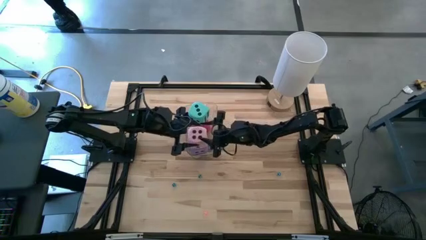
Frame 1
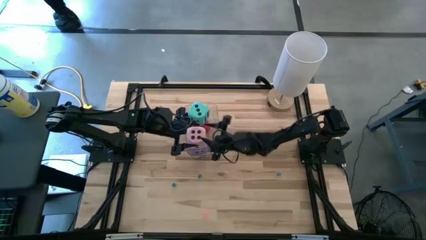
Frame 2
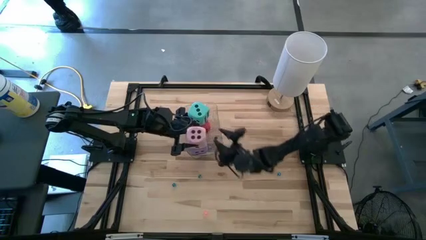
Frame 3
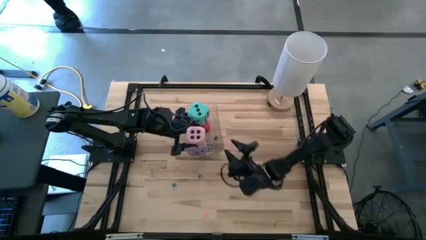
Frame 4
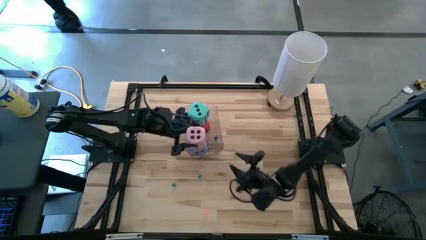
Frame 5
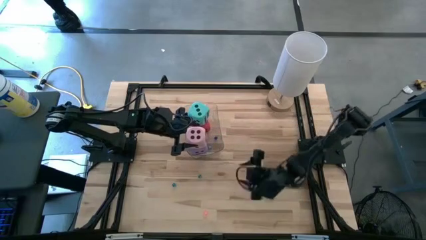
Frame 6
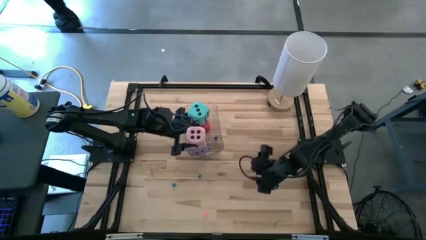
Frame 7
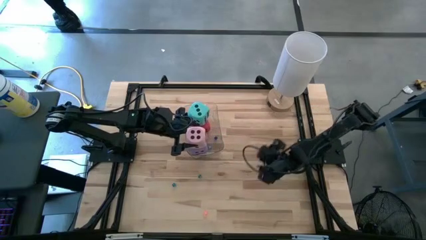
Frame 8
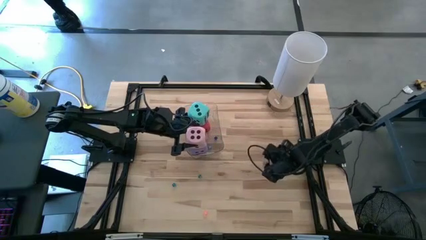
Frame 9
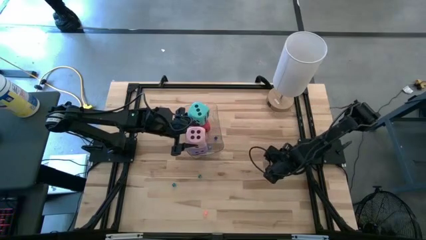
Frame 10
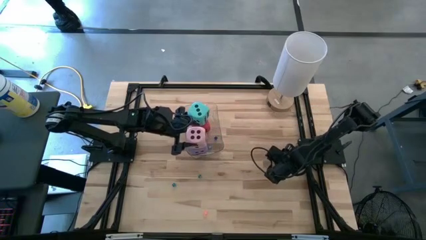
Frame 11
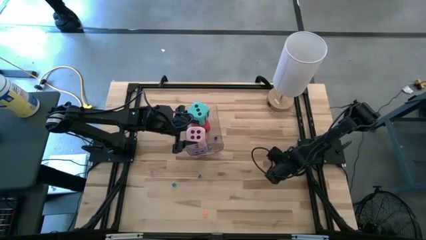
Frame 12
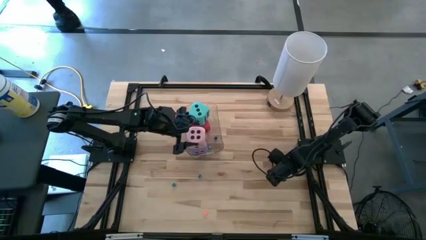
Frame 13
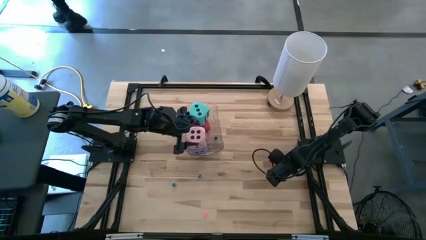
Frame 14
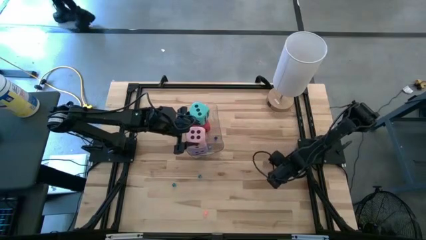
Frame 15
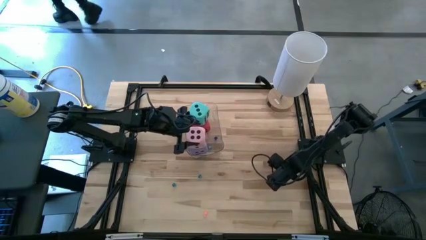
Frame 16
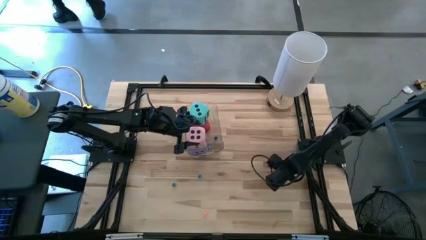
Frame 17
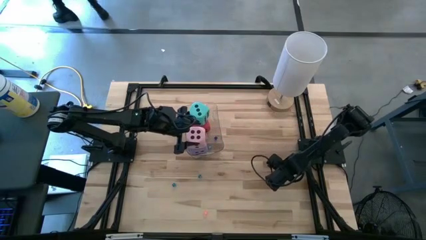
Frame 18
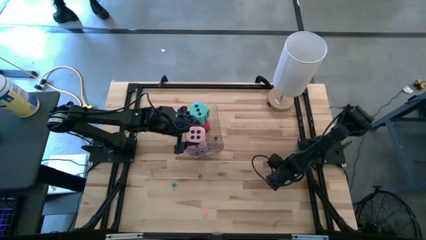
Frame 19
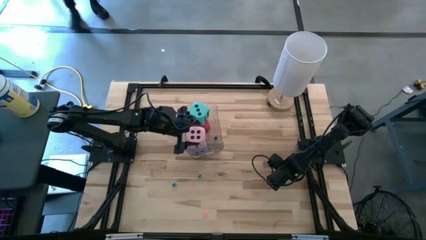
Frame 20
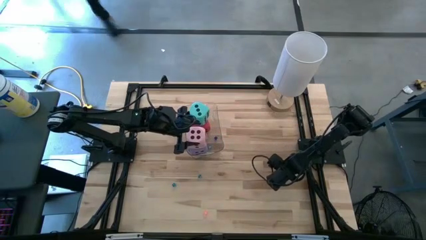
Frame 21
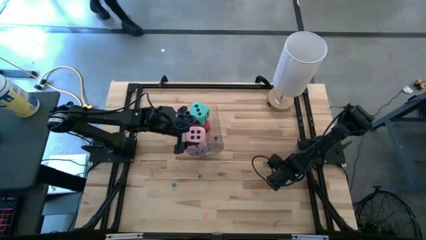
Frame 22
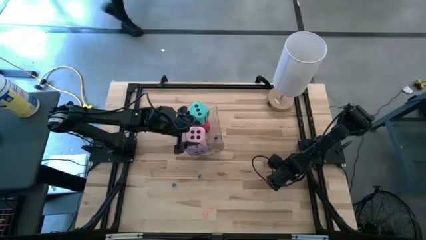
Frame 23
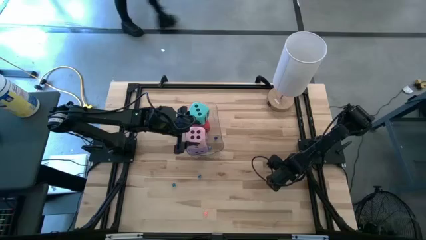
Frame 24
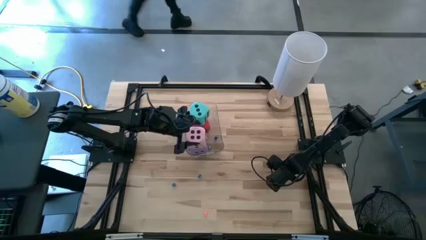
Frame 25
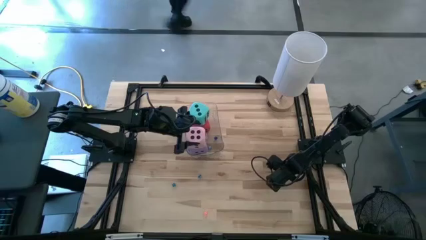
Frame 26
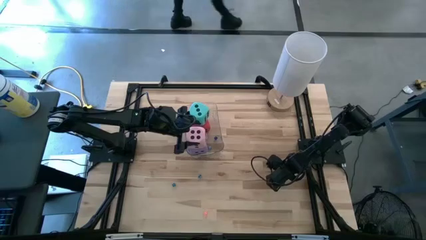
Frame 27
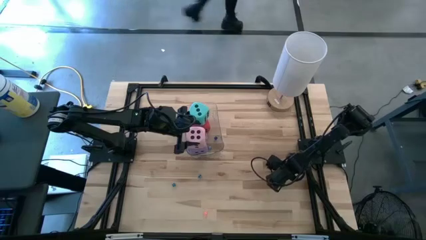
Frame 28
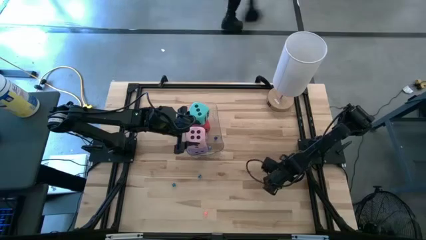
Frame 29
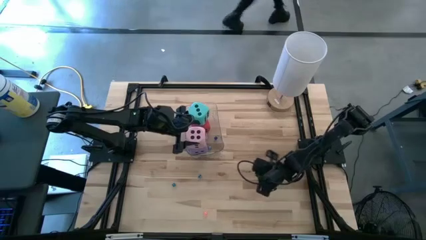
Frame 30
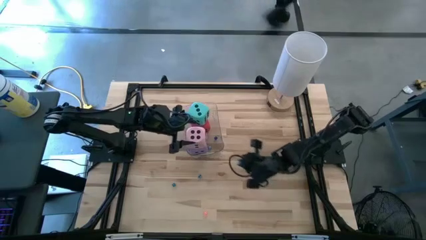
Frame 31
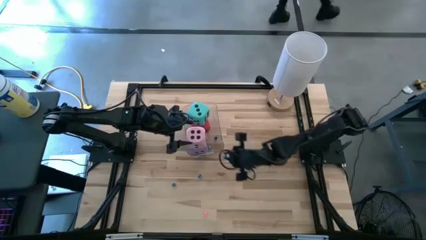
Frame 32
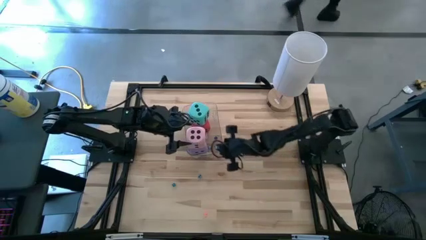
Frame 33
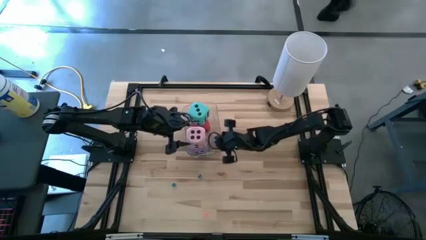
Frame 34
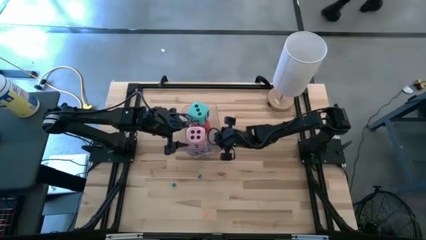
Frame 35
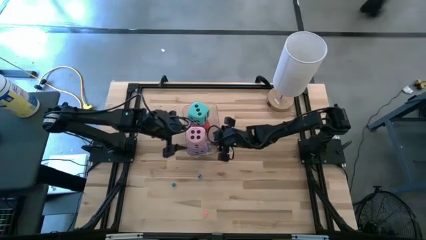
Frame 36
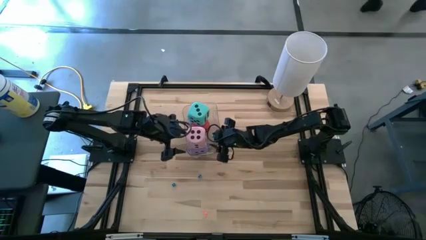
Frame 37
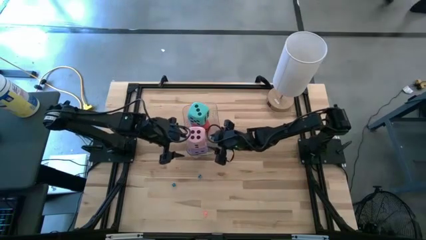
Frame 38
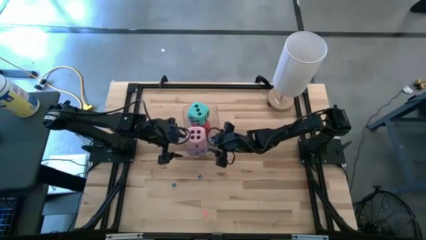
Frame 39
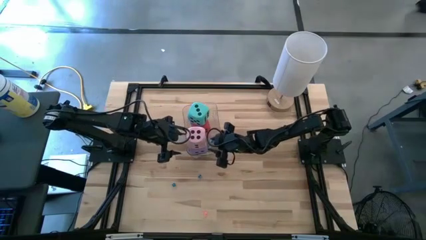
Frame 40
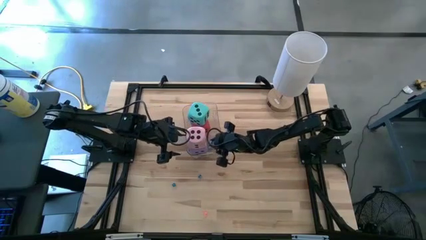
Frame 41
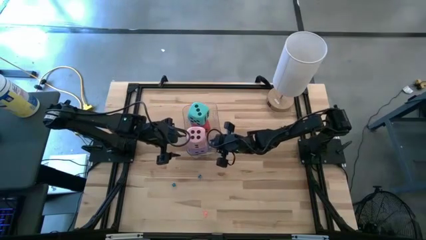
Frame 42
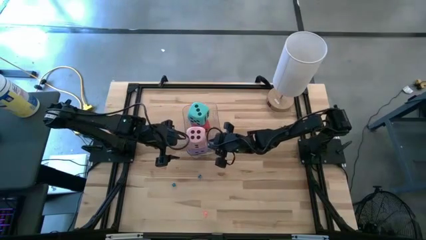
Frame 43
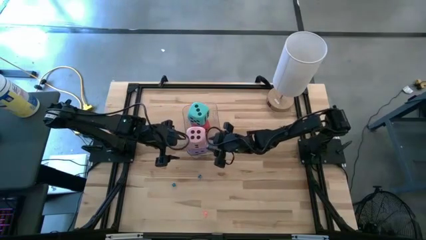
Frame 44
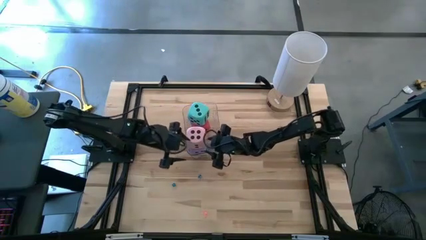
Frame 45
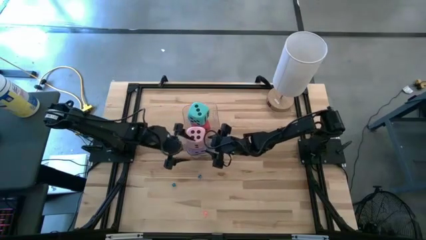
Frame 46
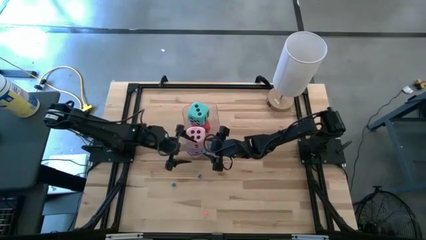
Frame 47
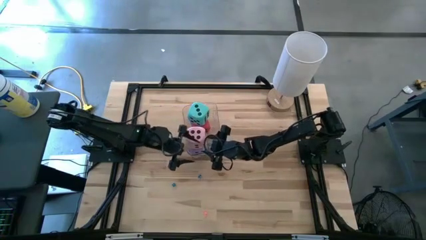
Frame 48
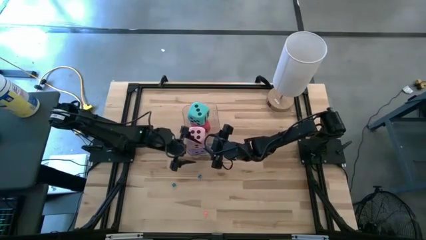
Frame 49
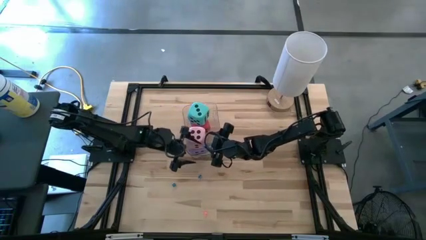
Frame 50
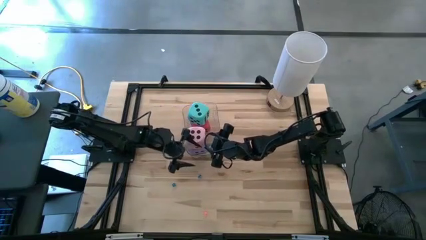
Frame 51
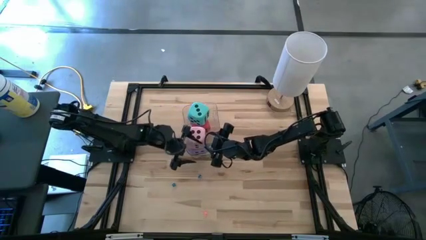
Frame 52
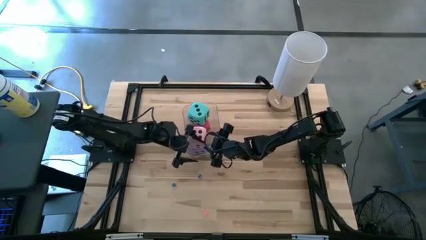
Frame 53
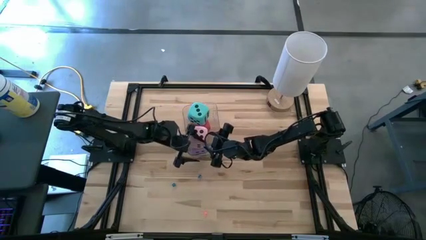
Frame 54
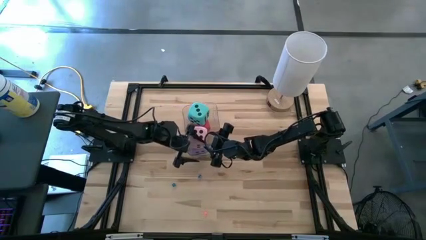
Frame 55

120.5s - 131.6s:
Task: Pick & Place Dice
Put the small light blue die into the transparent bin

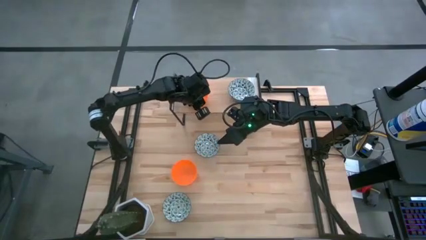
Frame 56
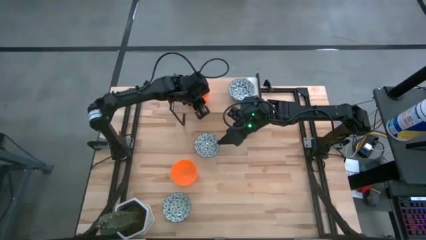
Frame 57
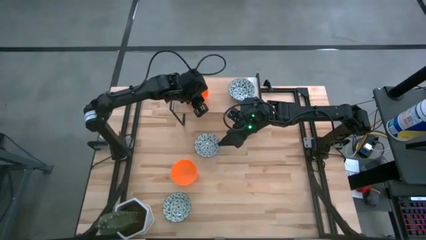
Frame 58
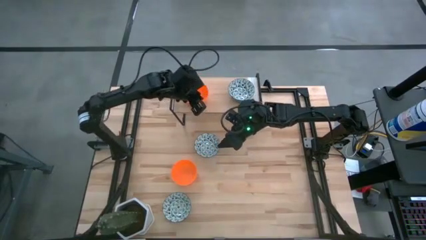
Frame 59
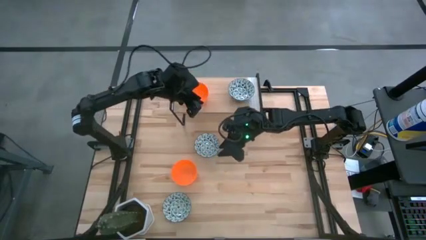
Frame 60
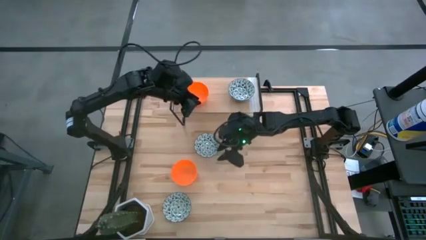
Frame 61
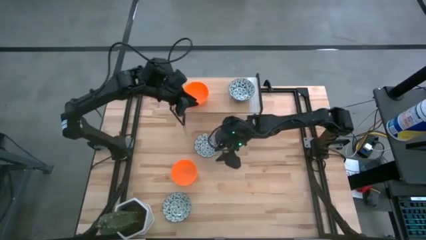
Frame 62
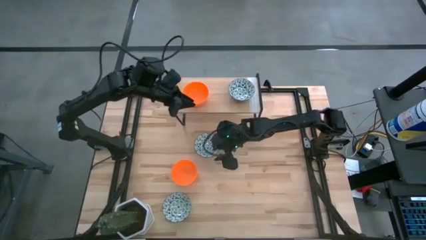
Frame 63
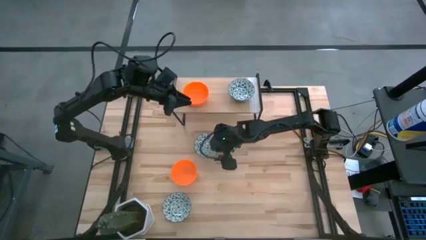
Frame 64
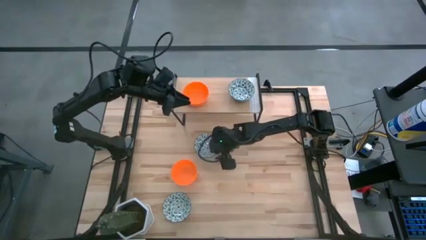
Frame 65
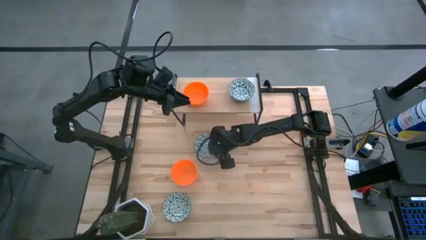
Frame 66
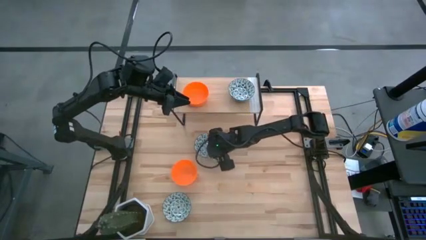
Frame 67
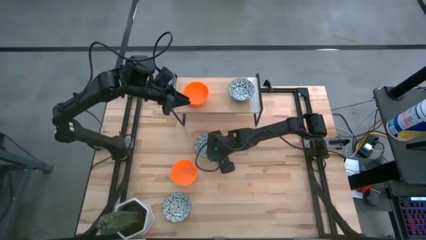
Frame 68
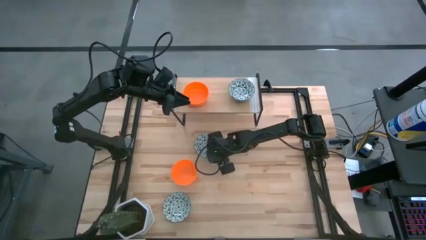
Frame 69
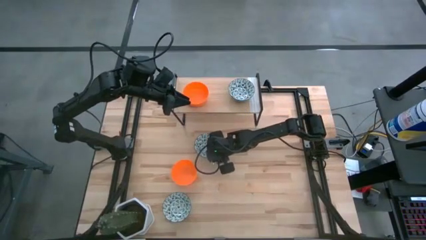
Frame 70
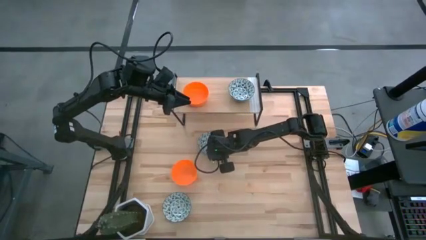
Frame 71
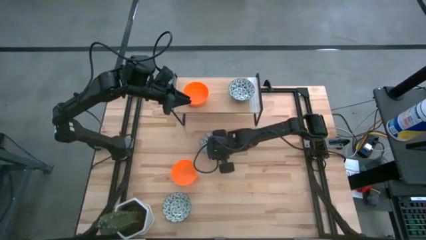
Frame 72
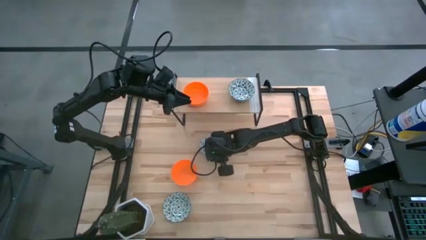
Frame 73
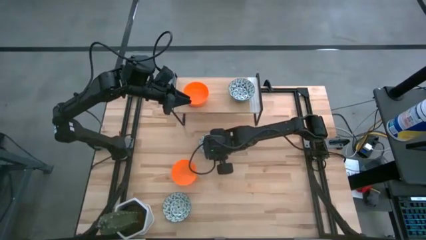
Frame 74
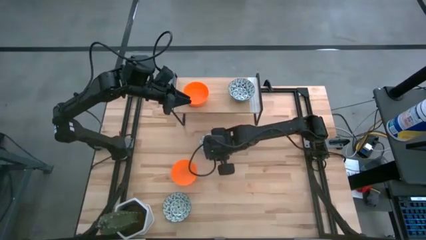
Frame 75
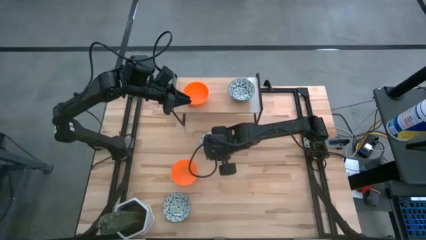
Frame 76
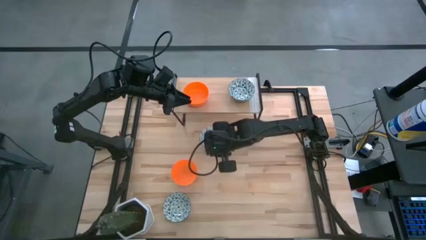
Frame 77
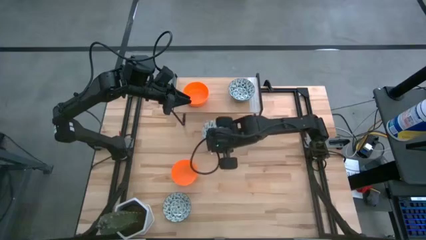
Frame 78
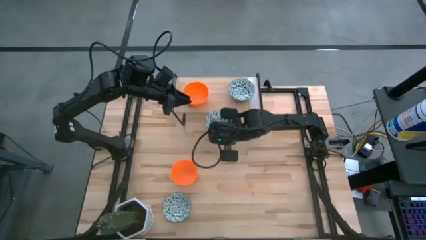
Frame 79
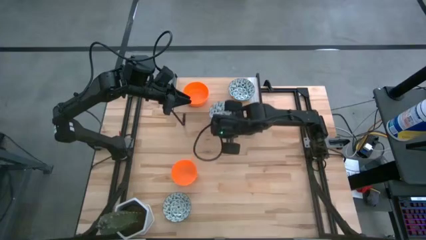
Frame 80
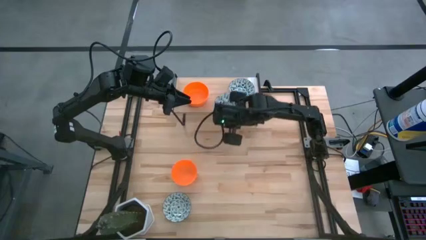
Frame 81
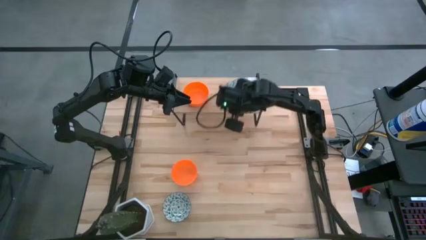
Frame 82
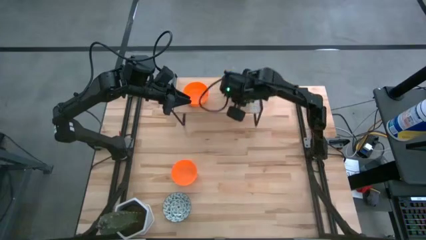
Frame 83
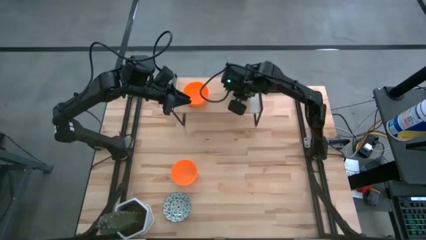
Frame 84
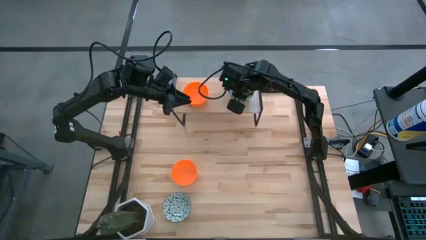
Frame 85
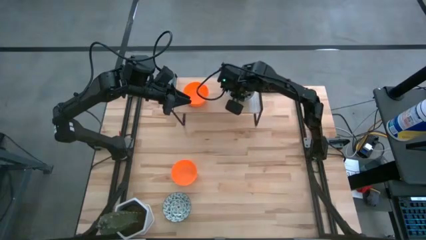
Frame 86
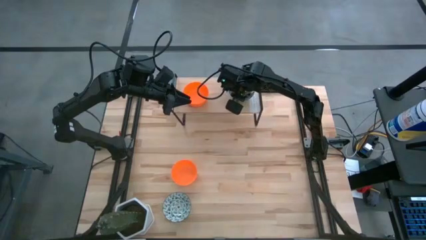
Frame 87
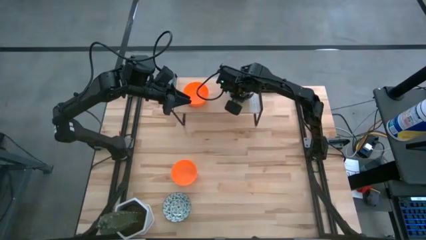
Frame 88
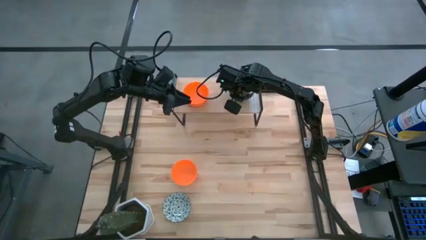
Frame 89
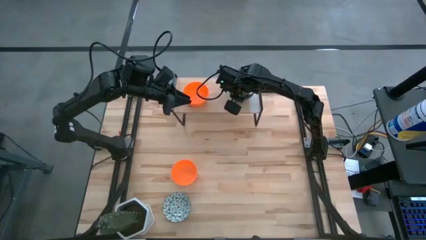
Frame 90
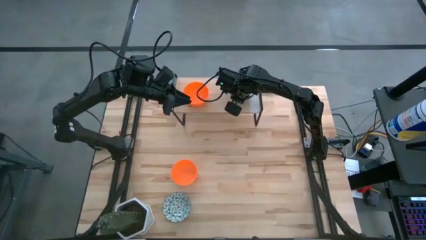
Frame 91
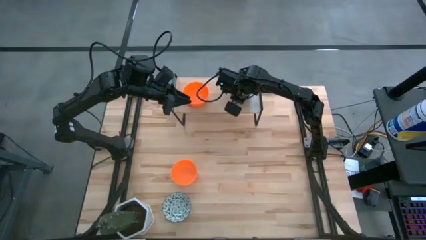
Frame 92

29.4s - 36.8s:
Task: Pick & Place Mini bowls
Stack the top light blue patterned bowl on top of the light blue patterned bowl on the shelf
